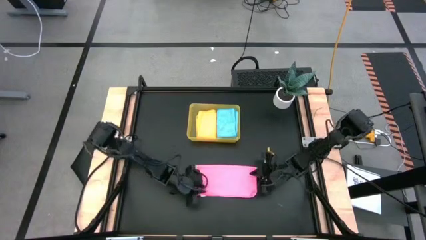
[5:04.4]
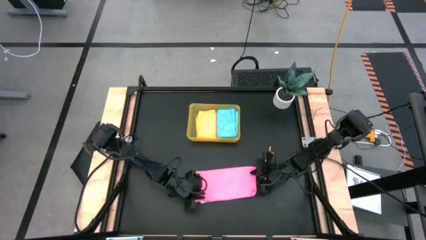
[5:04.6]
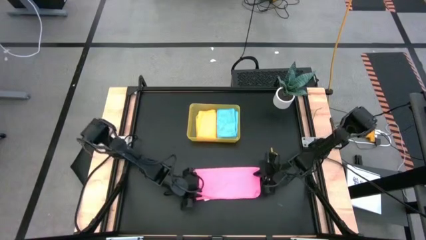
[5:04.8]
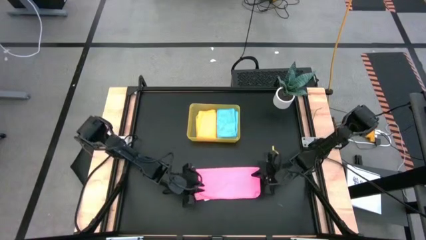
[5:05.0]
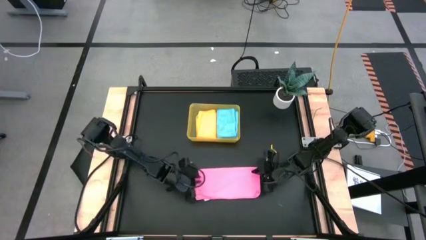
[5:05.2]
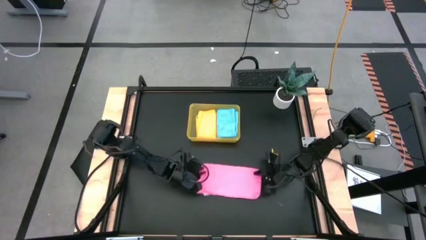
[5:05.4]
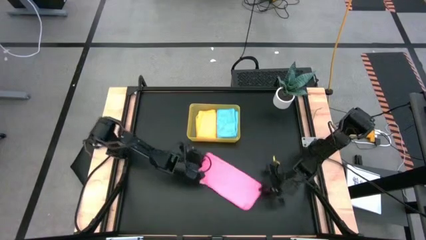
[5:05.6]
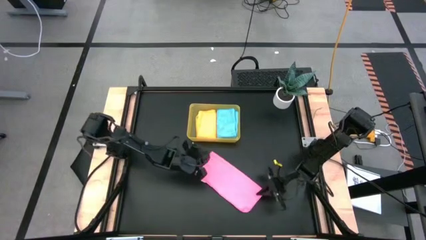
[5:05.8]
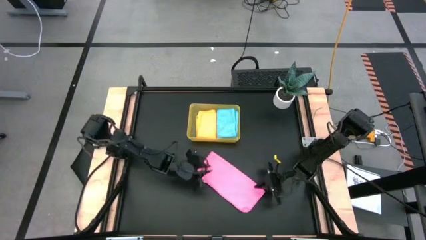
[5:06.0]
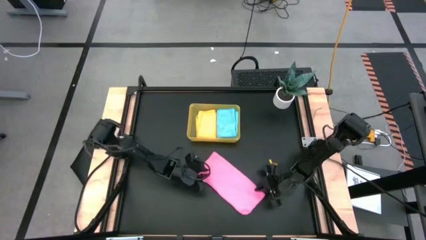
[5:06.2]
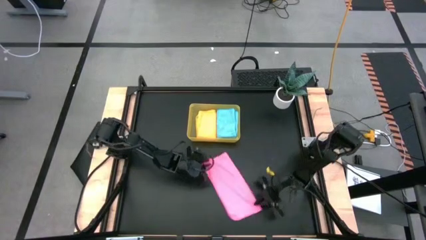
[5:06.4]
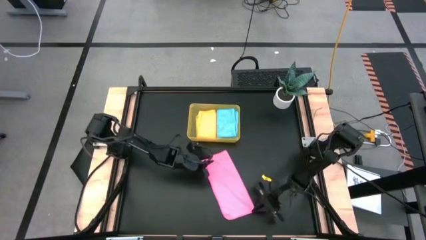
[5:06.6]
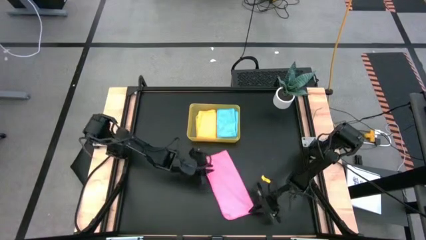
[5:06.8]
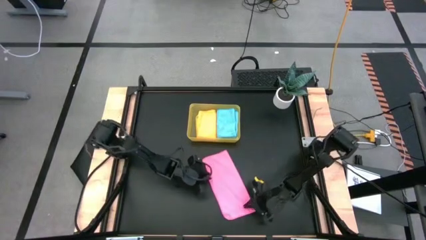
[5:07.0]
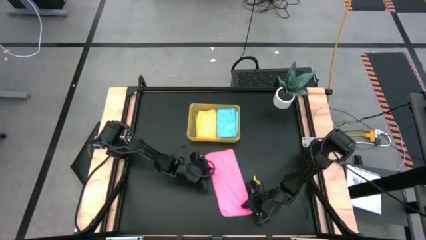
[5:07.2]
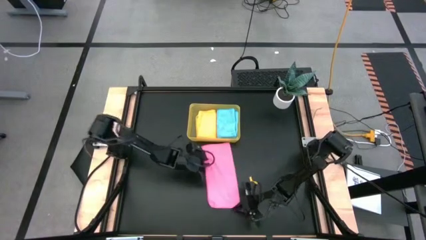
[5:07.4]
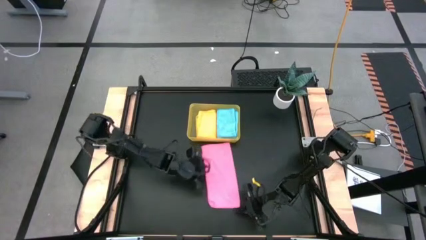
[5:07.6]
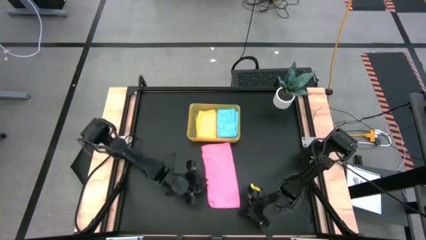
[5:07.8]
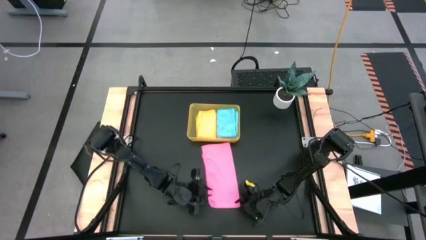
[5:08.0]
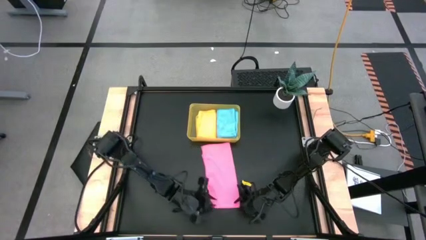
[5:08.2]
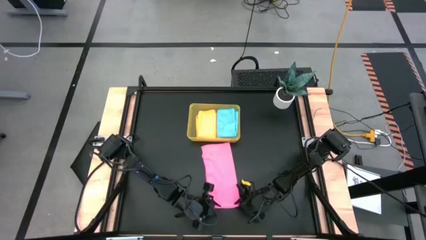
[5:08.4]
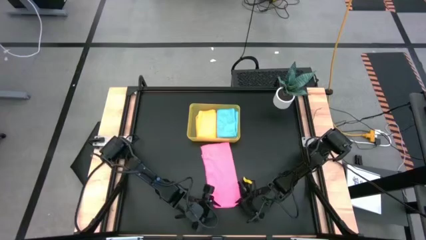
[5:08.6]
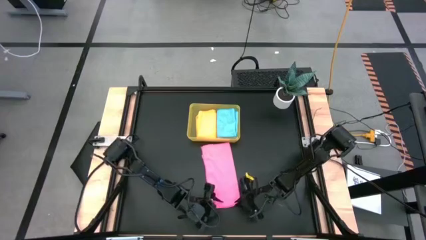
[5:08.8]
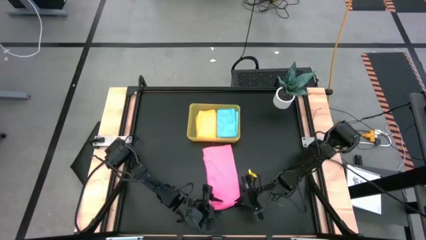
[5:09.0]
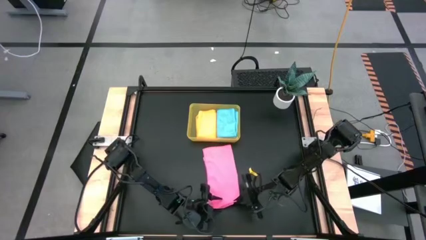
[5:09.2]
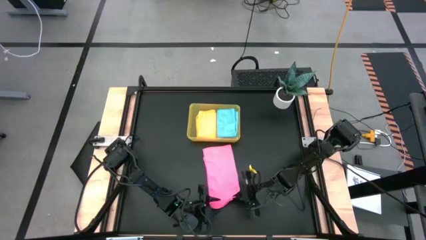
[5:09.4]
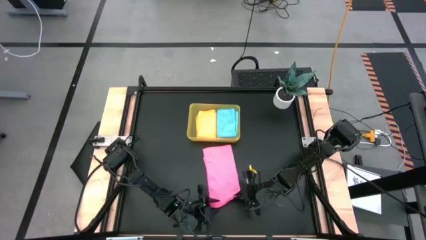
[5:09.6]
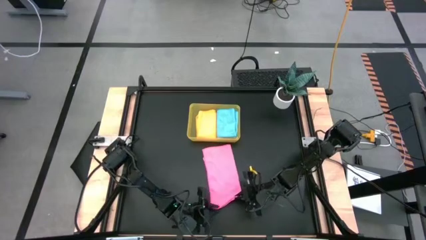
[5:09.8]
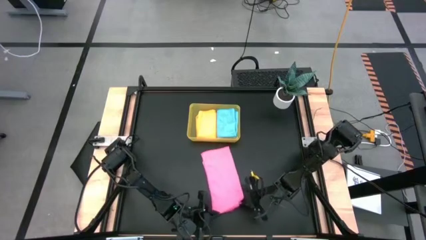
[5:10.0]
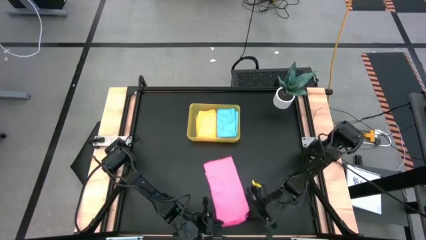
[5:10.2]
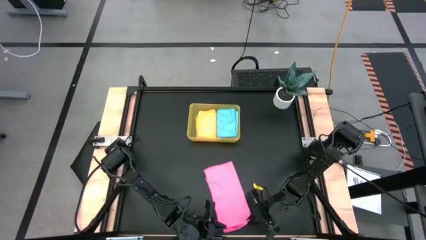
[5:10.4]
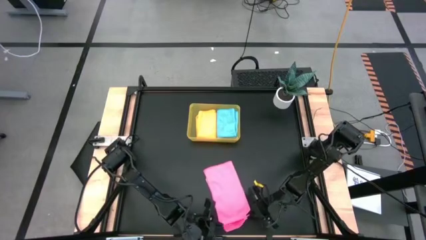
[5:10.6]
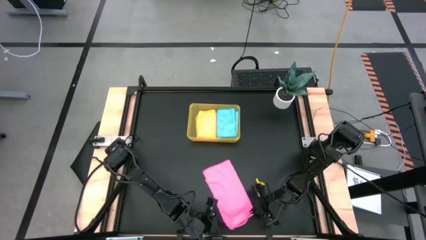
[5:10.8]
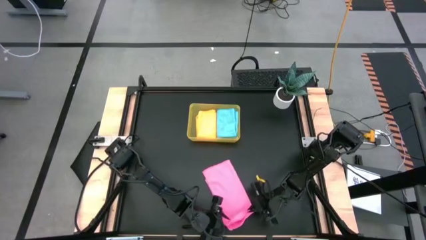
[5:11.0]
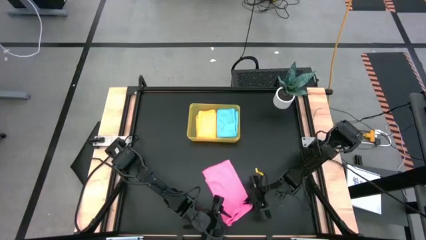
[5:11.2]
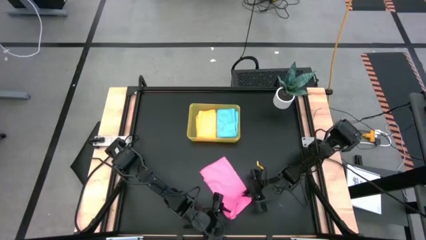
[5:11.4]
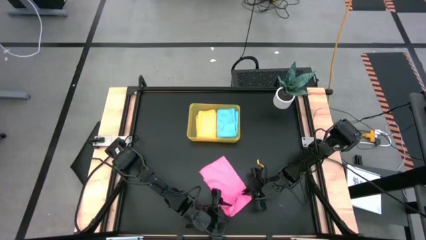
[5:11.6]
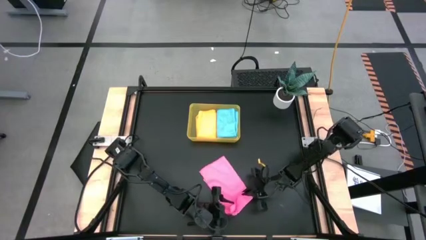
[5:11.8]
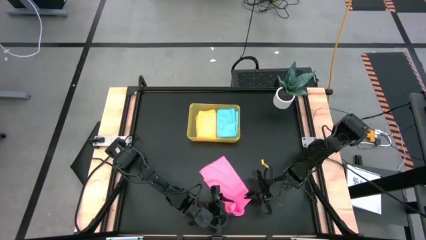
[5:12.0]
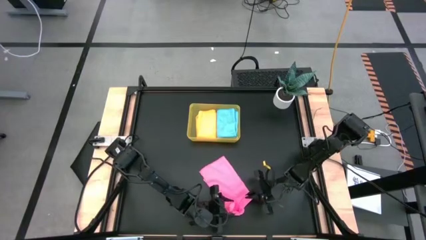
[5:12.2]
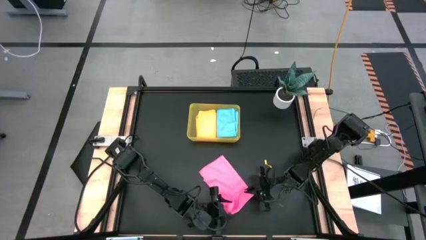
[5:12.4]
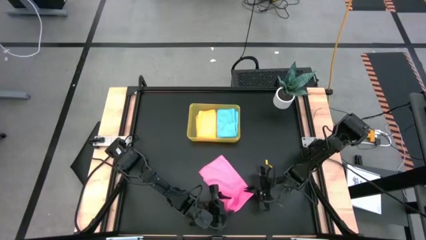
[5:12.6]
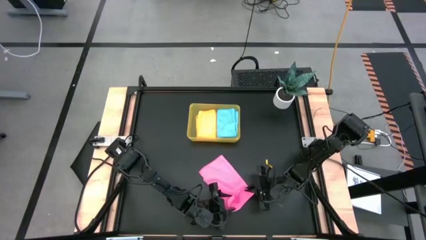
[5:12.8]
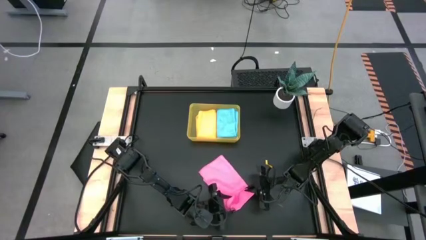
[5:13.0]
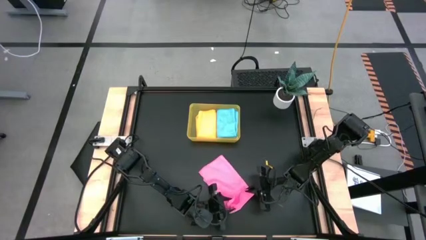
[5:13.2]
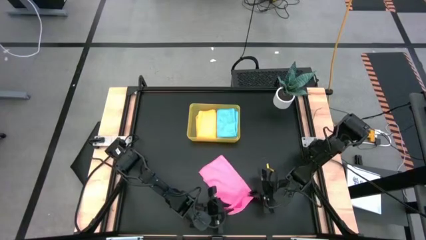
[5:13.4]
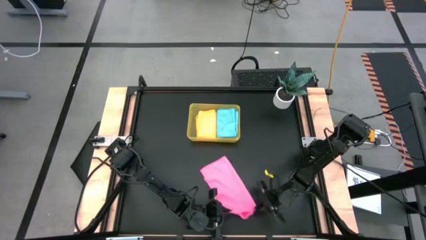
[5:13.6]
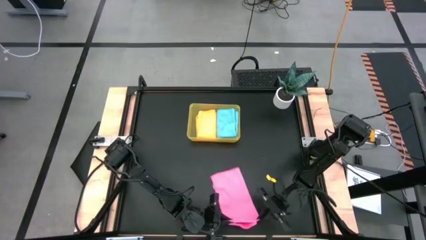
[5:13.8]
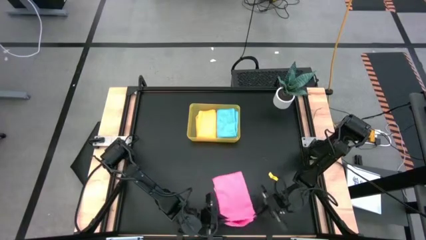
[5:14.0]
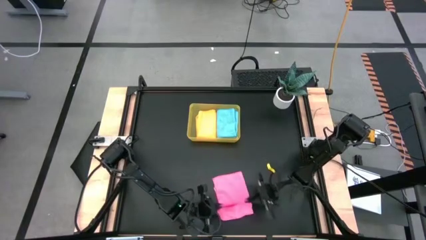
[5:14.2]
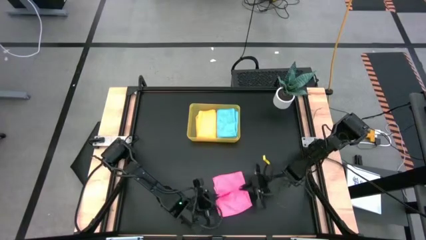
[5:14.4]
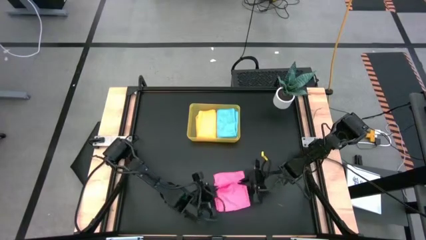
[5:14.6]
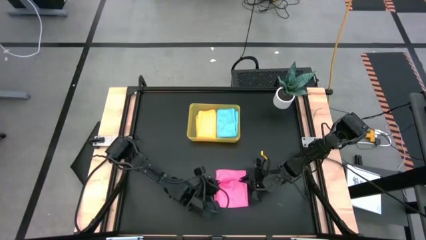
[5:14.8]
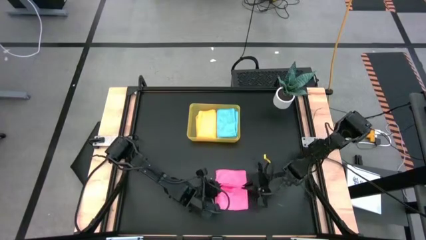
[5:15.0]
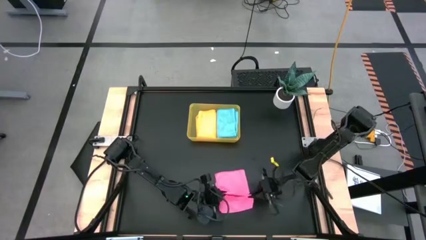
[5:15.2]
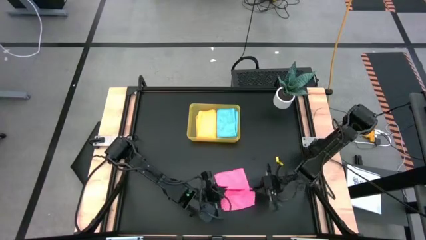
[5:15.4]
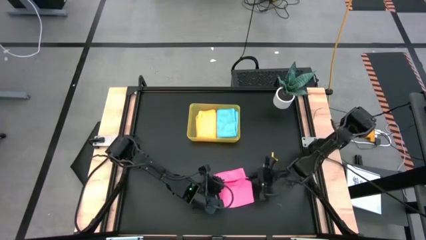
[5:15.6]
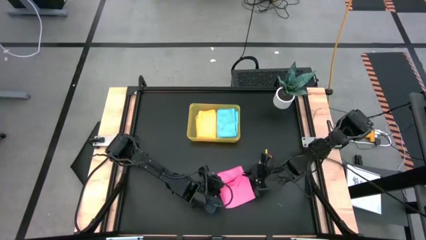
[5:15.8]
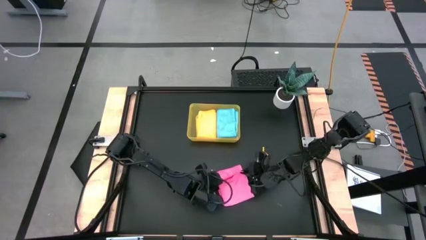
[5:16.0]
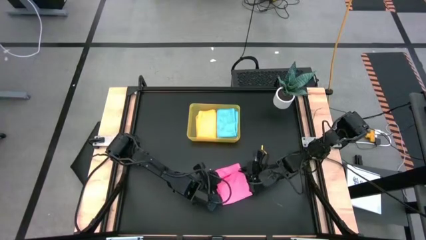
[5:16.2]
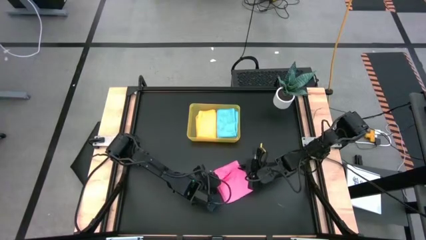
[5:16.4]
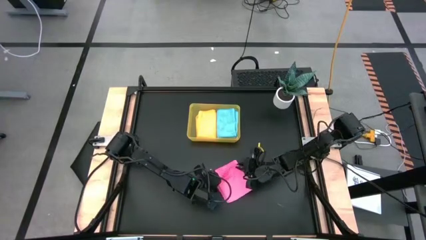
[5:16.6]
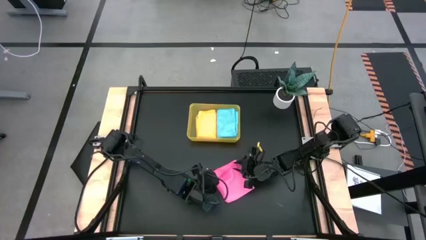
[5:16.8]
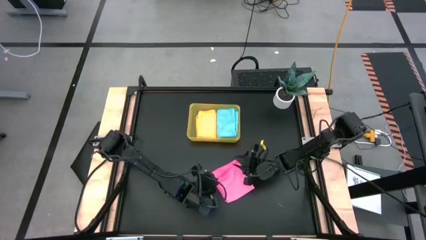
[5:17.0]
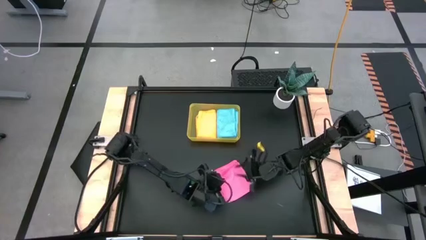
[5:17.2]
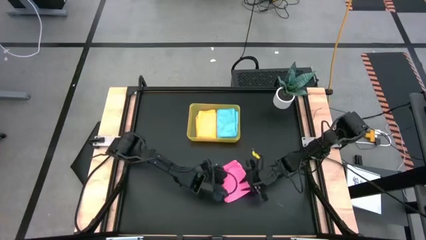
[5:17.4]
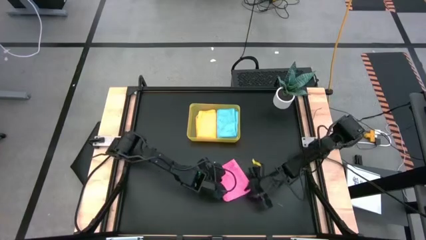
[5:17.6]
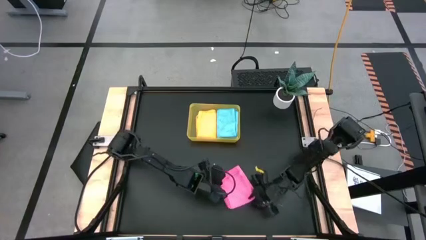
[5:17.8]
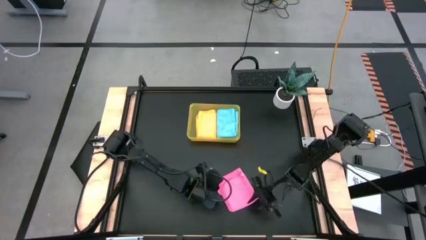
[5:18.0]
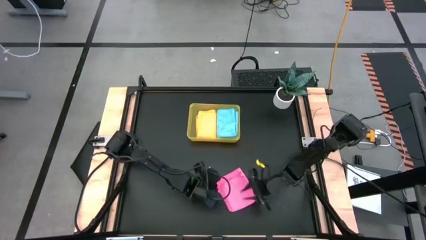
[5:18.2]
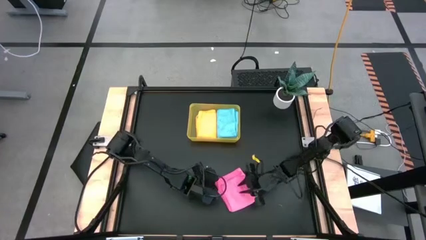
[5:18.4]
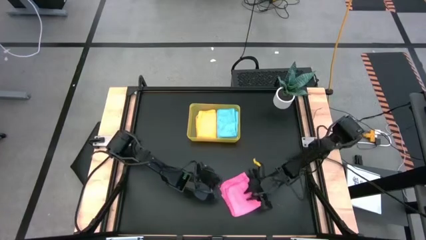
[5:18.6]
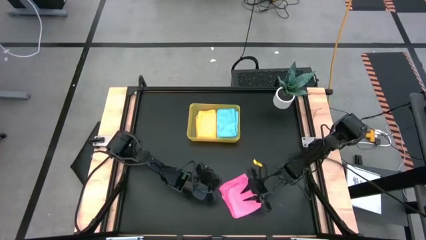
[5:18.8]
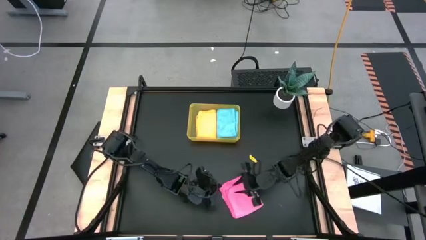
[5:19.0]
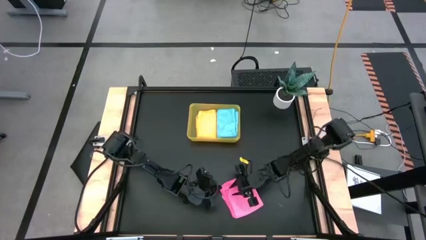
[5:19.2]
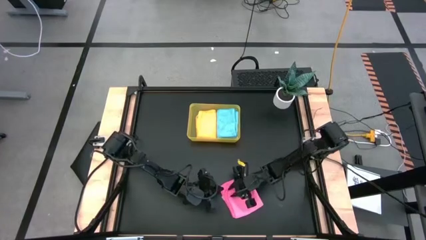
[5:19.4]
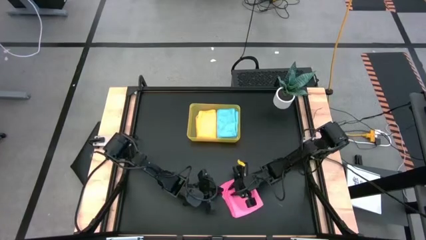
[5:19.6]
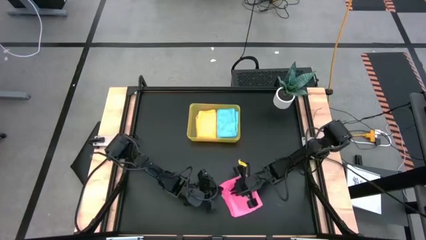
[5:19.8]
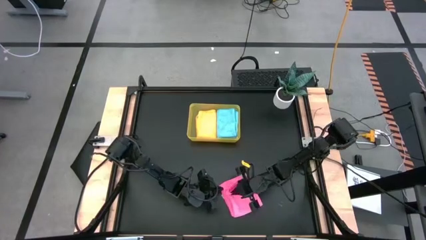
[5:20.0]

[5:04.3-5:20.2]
Task: Fold microfiber towels
Fold the pink microfiber cloth
